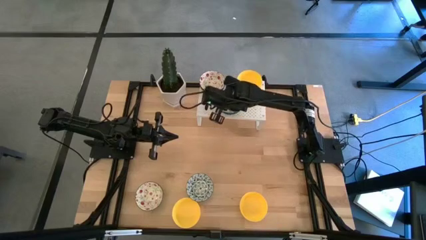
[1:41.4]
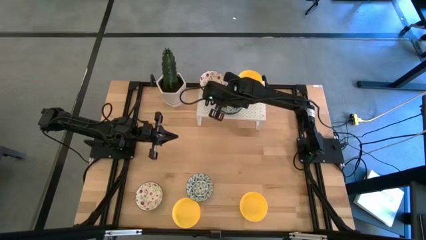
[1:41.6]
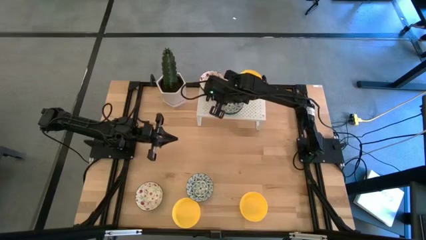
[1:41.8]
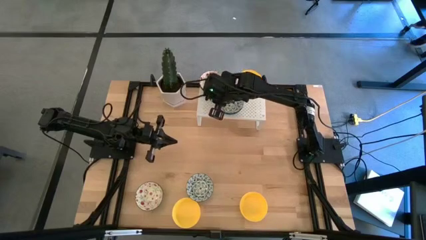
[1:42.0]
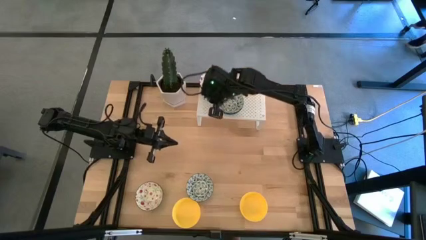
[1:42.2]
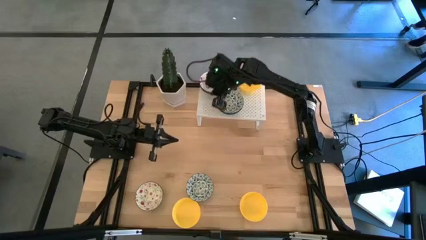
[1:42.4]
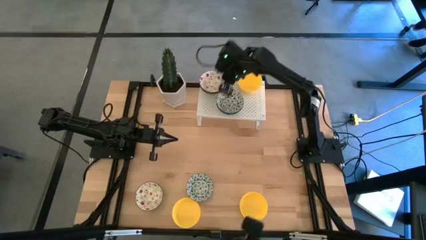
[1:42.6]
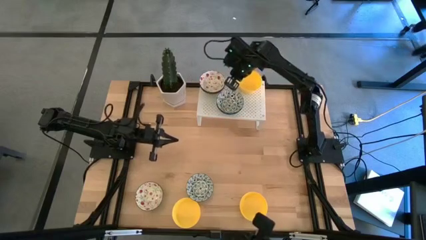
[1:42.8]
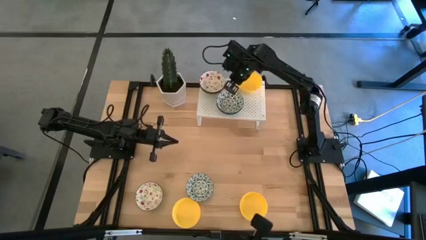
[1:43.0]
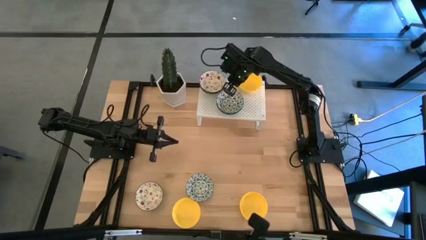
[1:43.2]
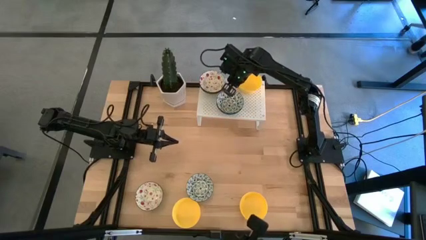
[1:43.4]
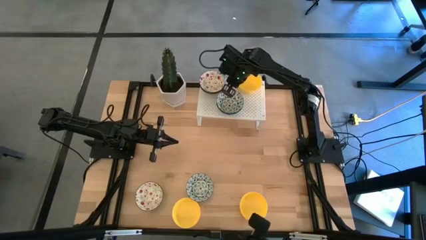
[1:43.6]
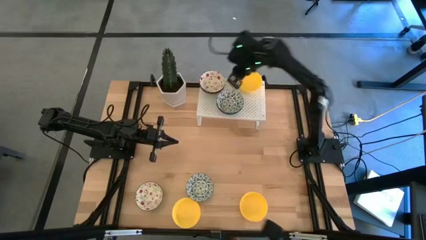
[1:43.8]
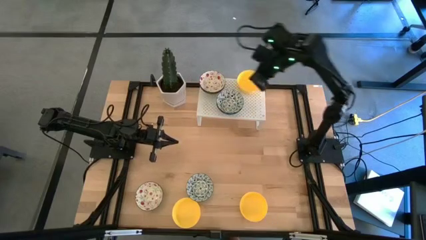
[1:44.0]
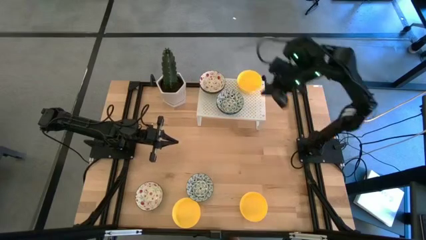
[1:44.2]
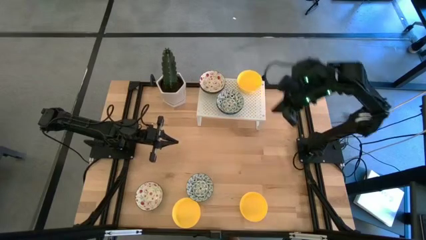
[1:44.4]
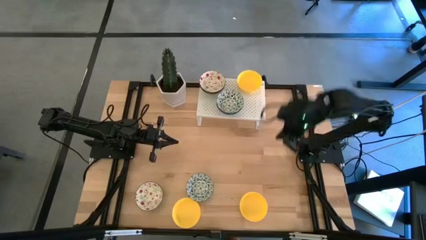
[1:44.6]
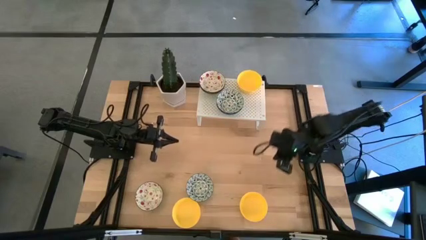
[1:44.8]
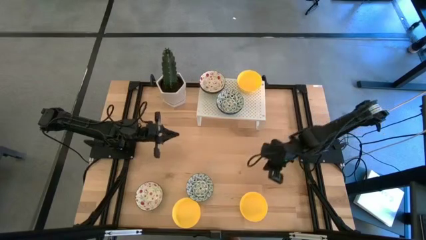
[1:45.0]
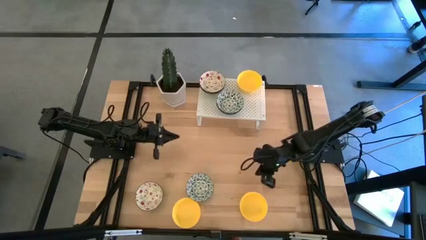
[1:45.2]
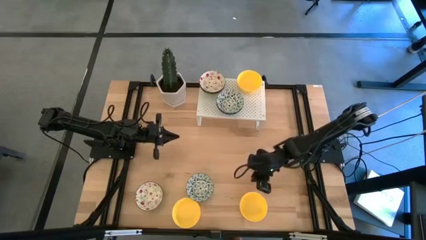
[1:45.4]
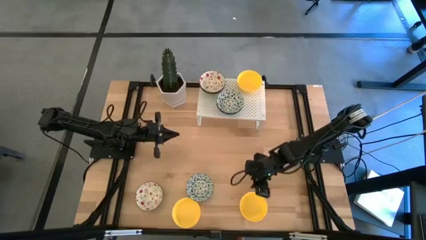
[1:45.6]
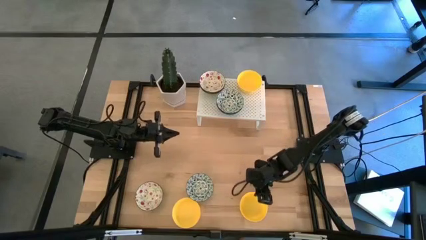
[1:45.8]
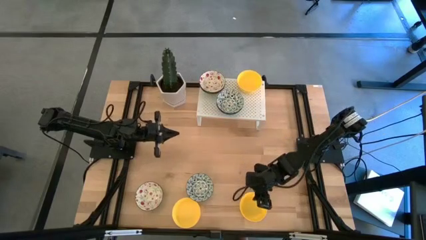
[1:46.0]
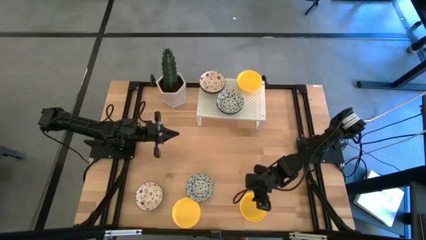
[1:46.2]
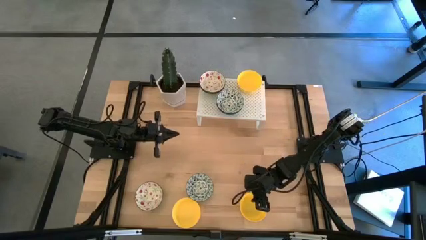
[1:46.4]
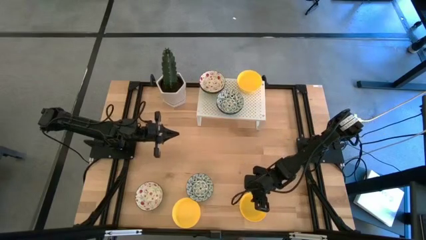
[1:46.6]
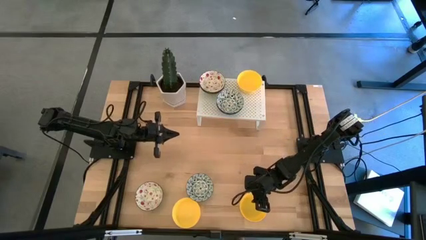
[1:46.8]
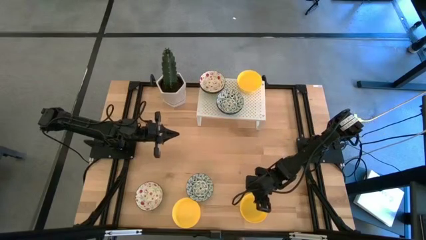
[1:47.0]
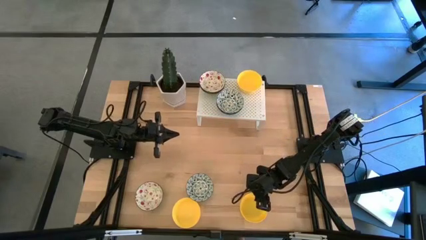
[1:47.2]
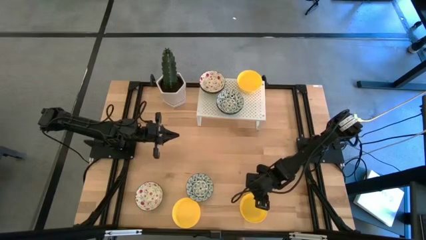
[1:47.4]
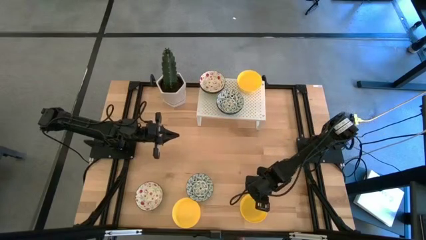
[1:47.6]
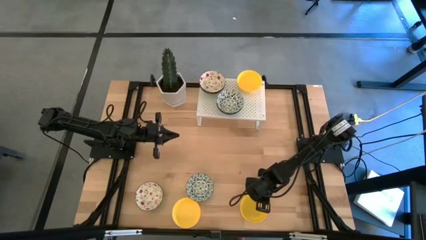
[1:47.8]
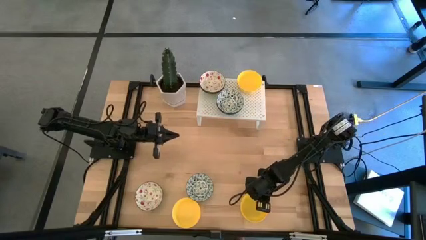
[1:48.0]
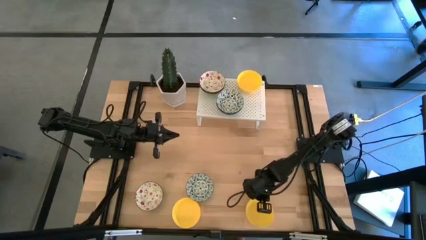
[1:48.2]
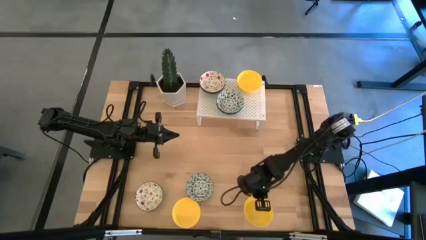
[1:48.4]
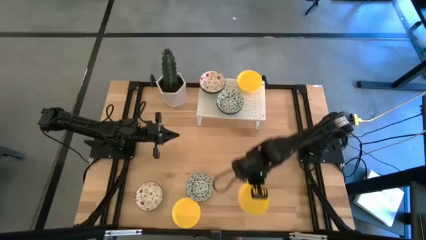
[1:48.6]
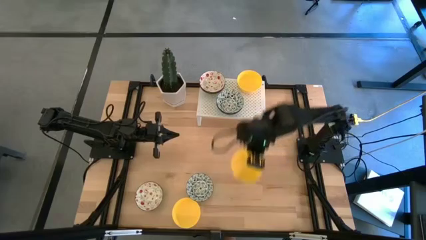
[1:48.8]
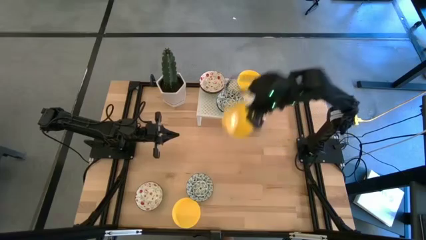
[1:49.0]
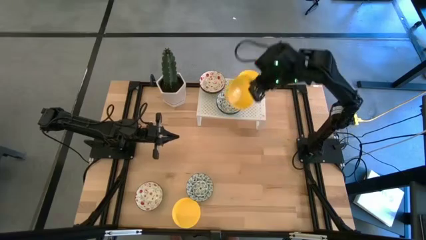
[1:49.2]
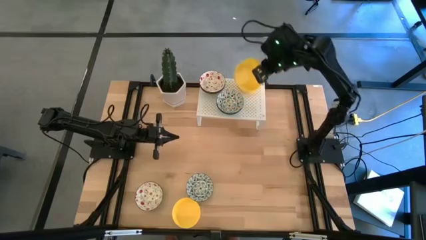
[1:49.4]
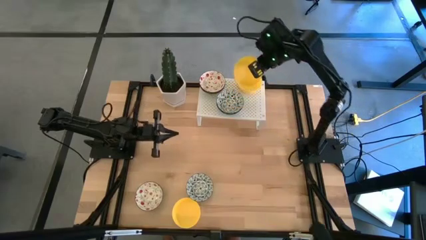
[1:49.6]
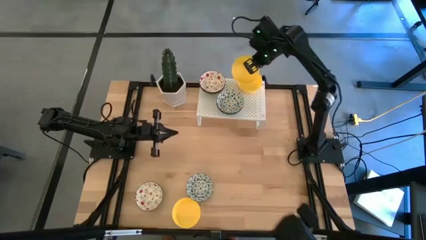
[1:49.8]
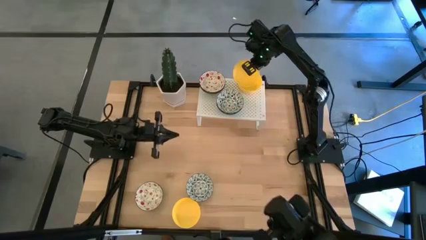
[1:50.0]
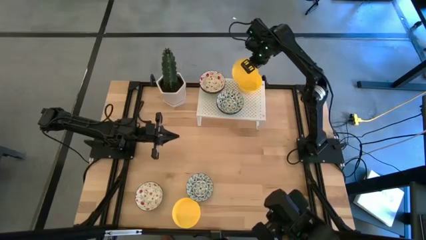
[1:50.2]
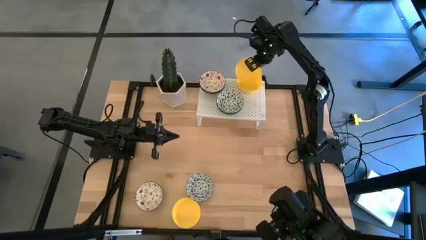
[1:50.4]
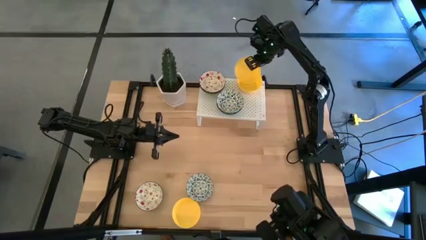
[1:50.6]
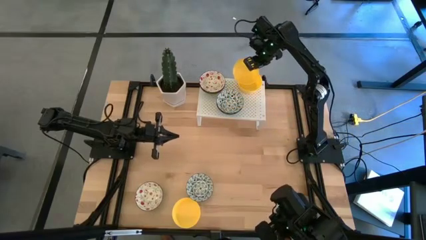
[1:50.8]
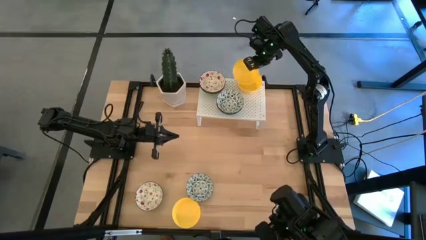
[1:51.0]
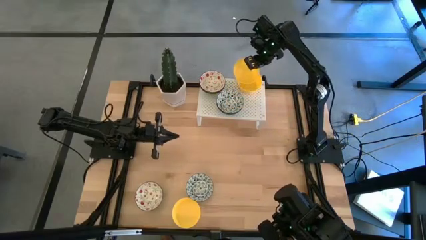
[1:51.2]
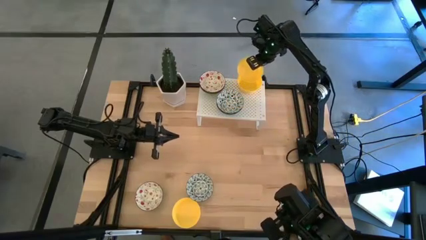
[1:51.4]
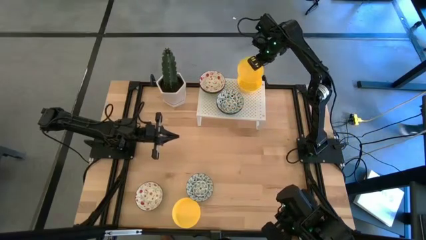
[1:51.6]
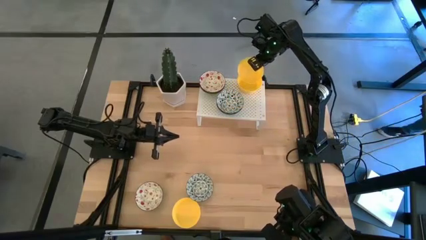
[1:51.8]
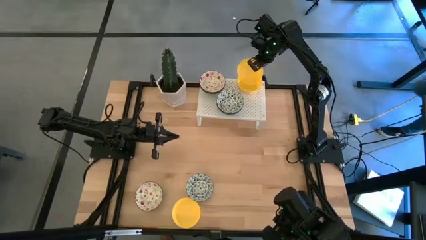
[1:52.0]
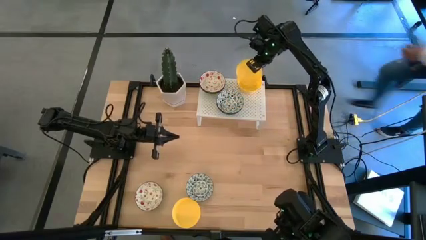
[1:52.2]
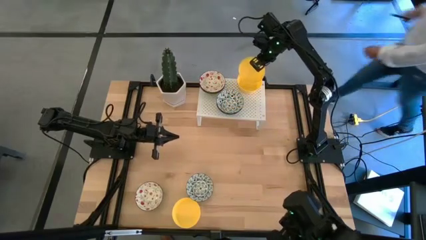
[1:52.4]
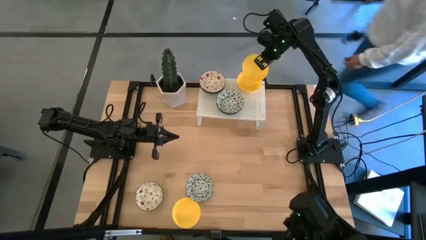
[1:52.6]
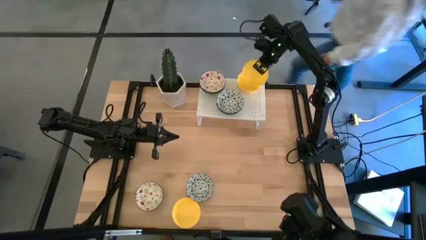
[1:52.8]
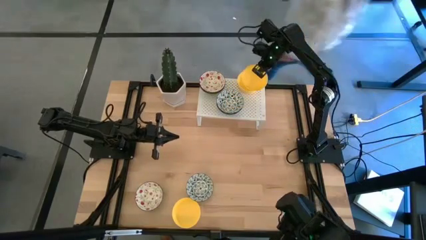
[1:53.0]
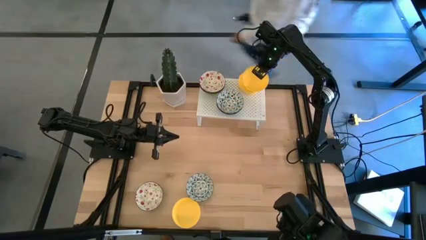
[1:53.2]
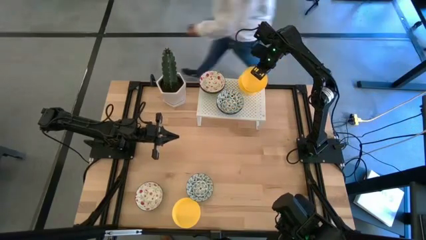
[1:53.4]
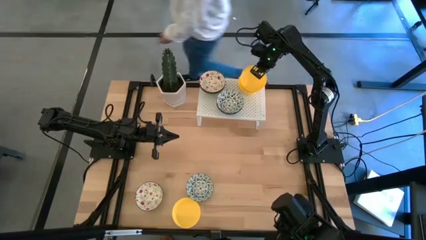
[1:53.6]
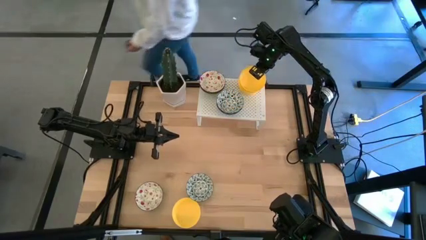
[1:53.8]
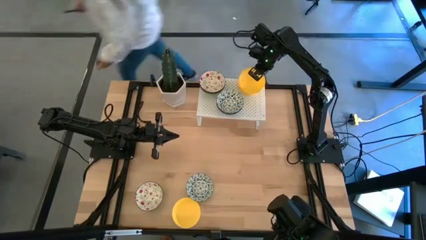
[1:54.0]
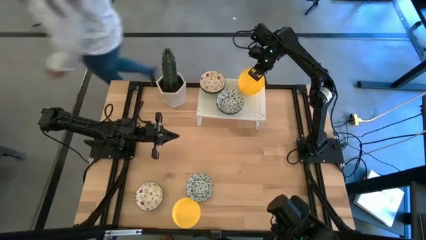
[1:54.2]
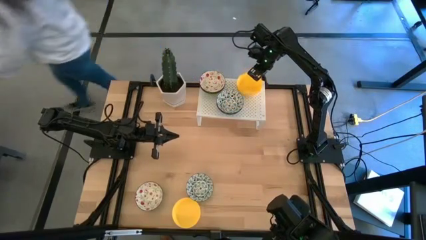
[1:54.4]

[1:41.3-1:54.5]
Task: Pick & Place Mini bowls
Stack the right yellow bowl on the yellow bowl on the shelf
